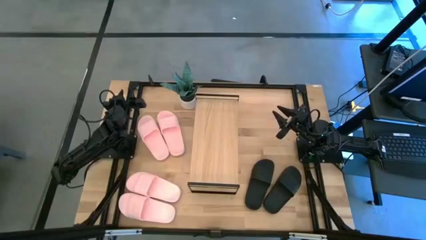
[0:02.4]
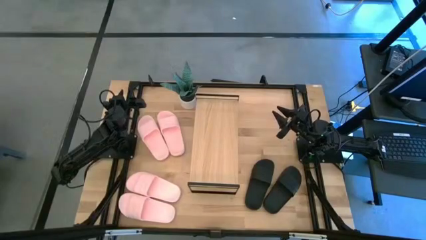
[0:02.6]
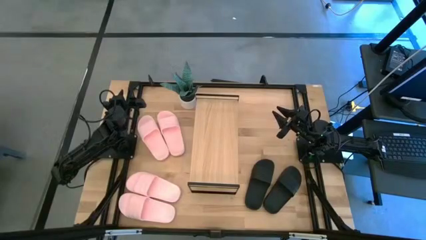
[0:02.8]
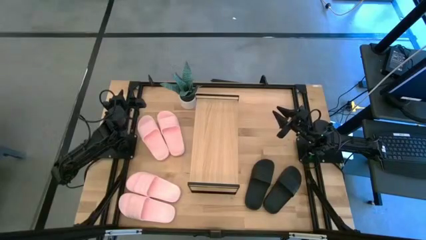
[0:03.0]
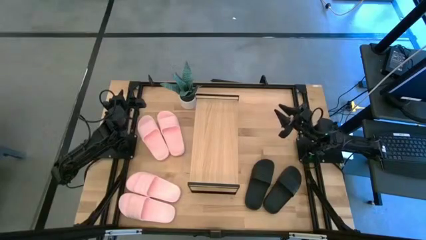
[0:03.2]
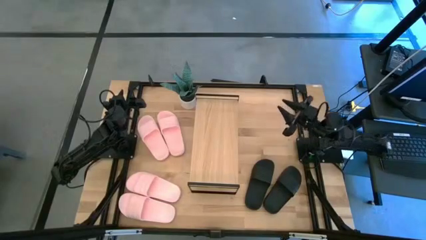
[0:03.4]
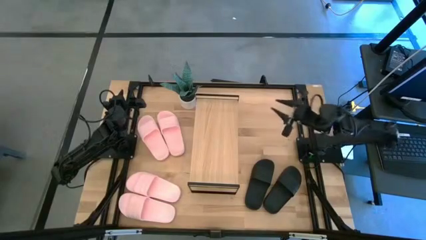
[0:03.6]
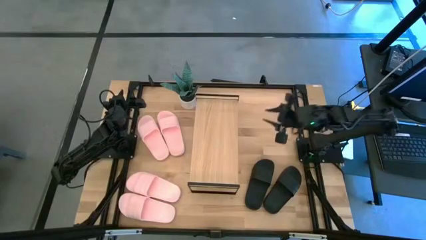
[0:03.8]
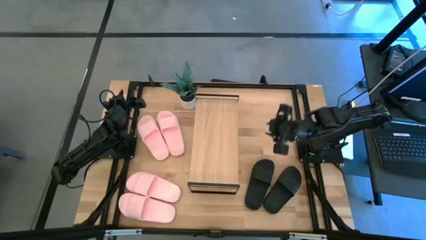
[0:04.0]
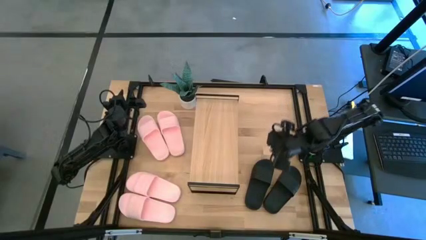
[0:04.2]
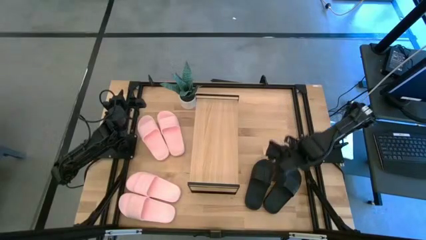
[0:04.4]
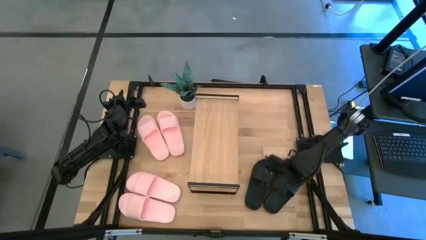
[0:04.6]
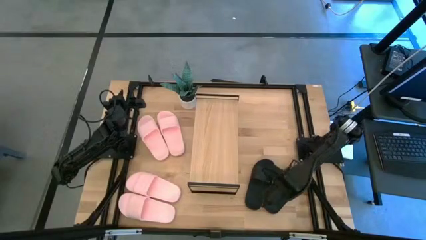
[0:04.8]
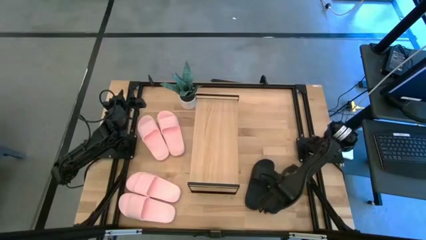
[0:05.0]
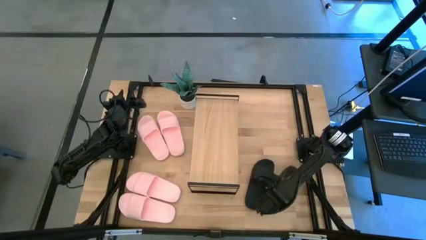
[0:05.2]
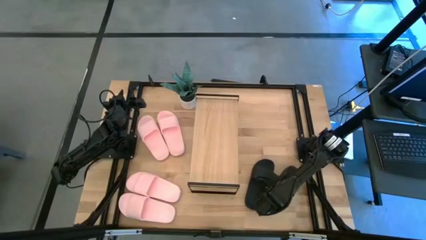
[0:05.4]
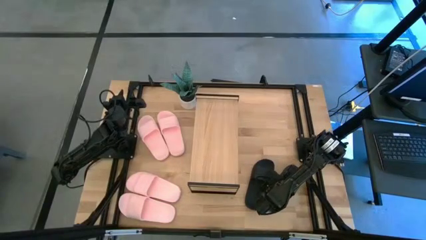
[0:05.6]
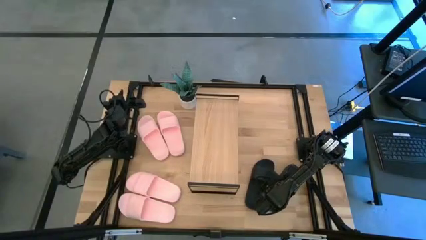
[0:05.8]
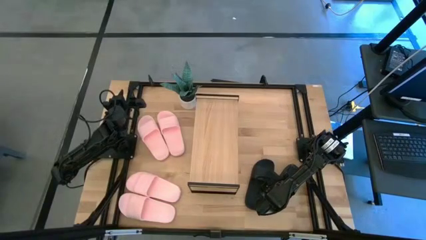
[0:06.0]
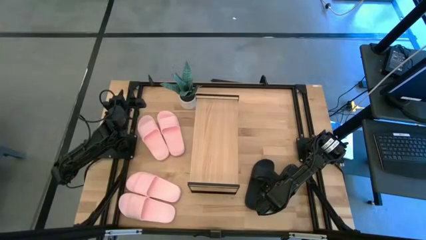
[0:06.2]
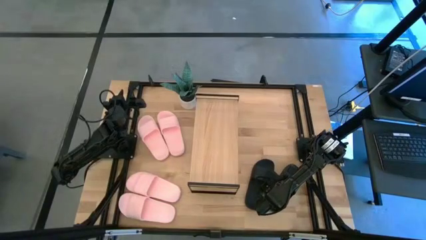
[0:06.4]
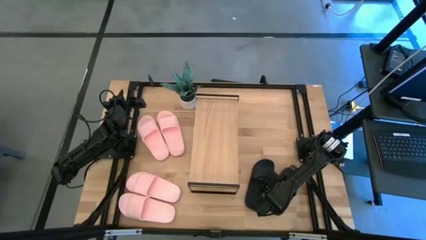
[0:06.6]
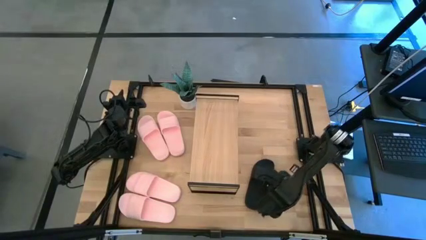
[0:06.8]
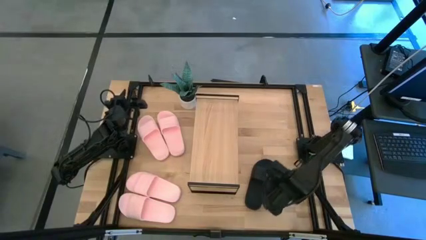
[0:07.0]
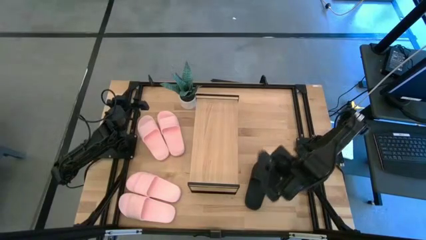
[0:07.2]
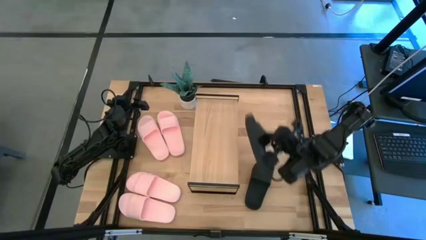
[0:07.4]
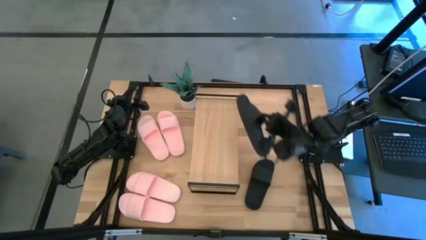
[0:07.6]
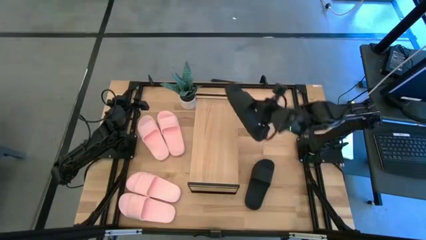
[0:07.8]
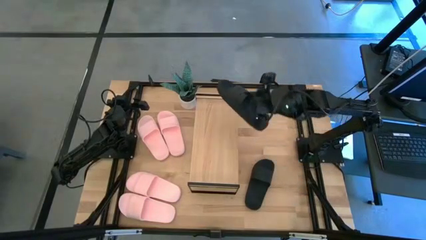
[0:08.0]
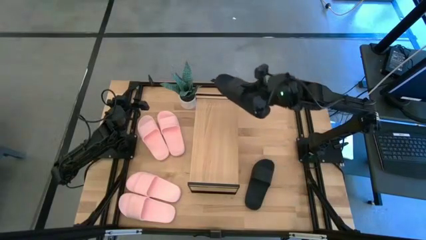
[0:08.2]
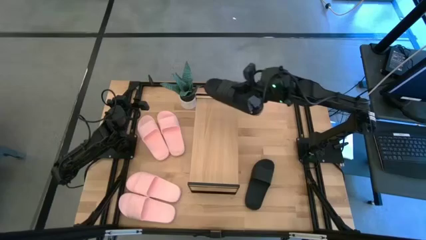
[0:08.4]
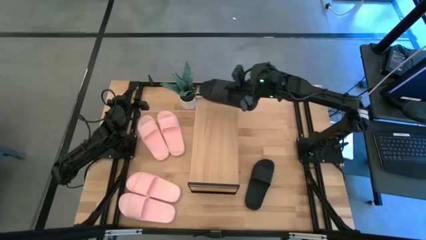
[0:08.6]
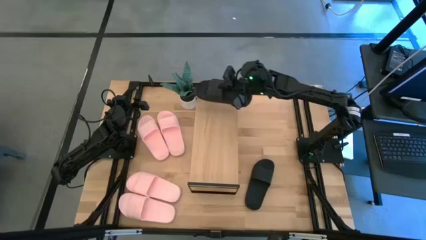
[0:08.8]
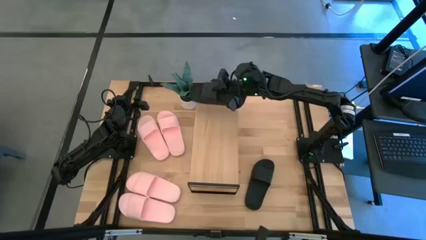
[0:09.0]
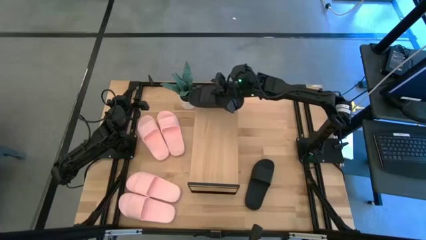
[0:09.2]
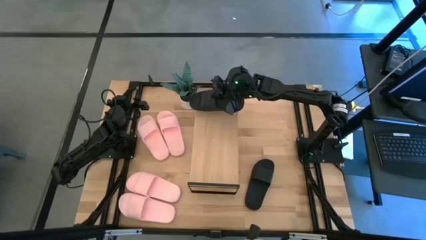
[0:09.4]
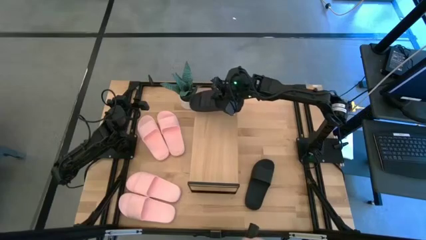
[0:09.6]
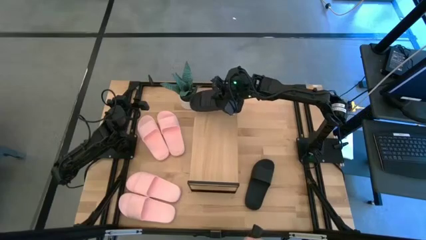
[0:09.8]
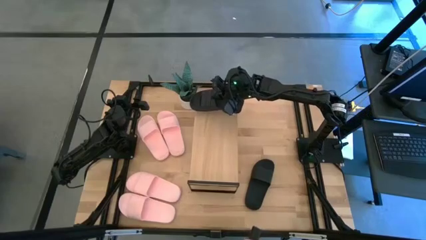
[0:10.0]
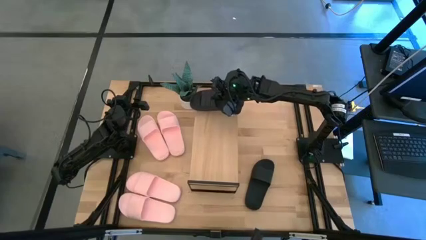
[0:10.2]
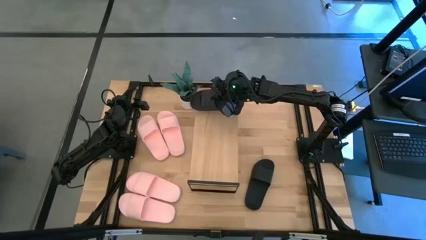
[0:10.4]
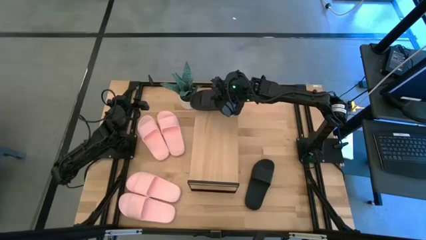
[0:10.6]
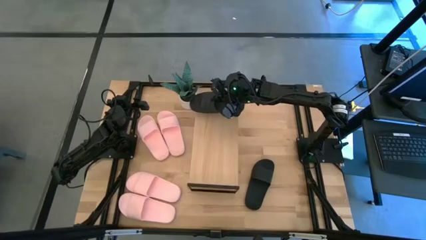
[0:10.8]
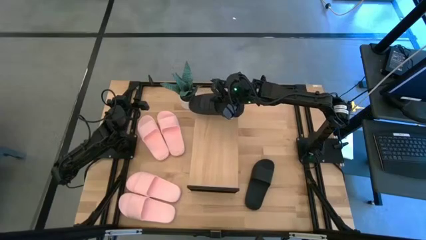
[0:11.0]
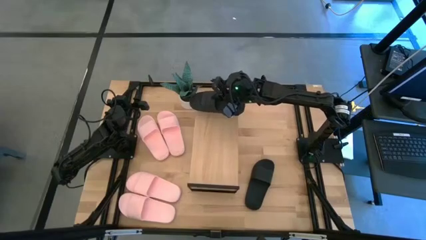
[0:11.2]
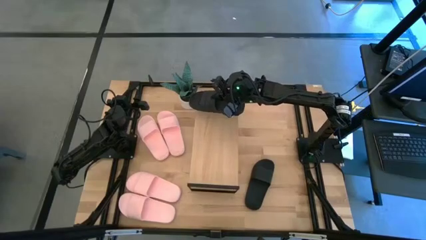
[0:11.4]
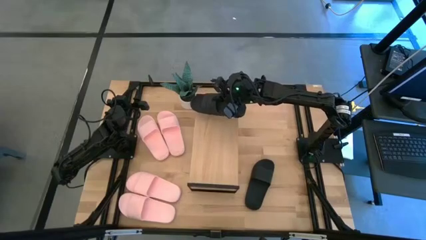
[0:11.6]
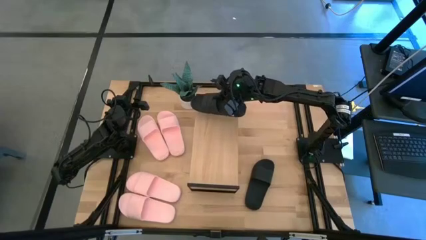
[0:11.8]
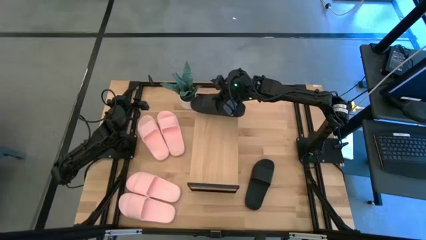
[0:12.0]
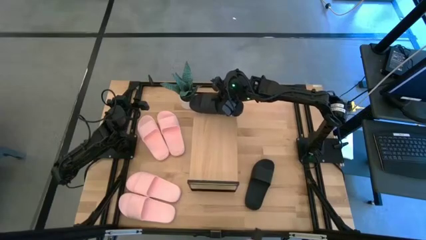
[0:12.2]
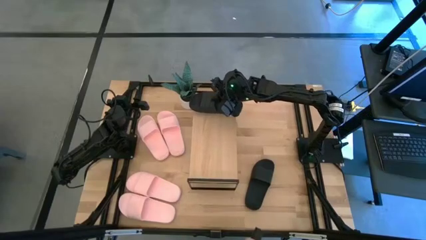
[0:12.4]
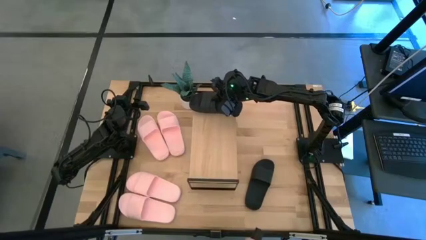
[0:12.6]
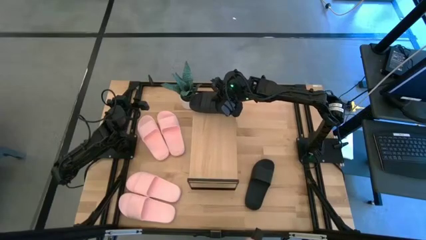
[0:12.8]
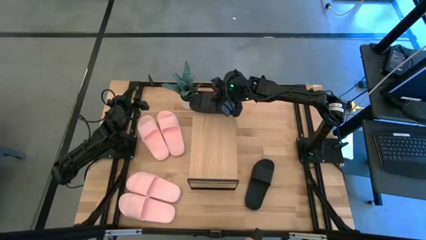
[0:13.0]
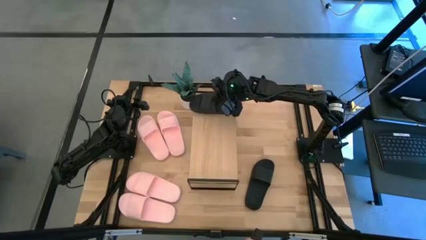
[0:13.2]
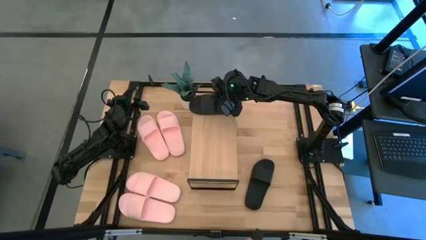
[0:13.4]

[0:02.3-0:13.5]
Task: Pick and place slides into the shelf
Put the black slide on the shelf

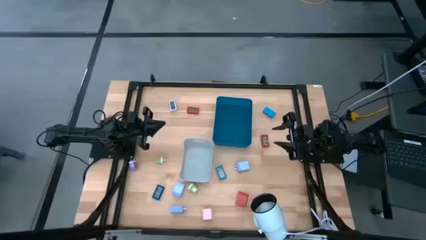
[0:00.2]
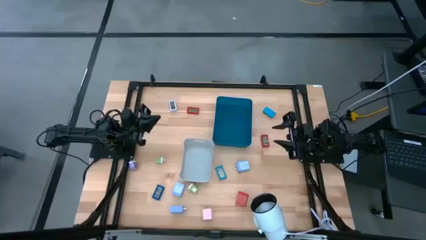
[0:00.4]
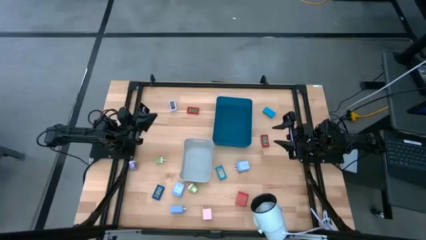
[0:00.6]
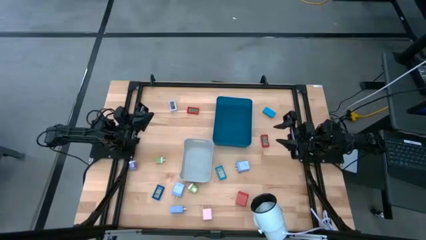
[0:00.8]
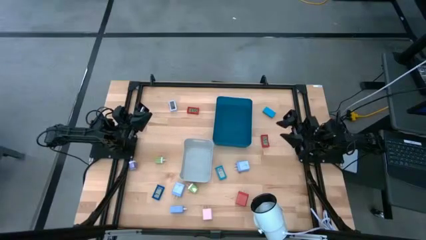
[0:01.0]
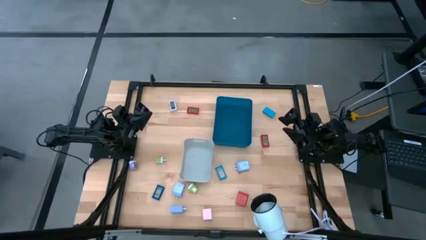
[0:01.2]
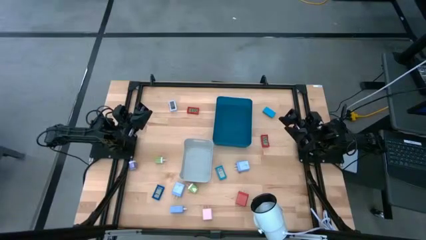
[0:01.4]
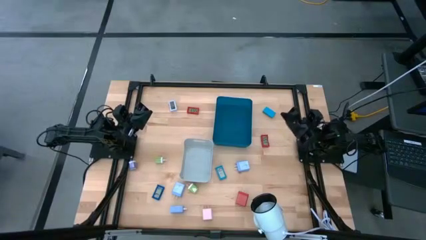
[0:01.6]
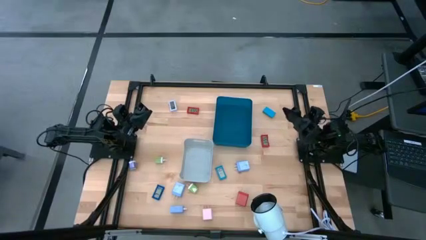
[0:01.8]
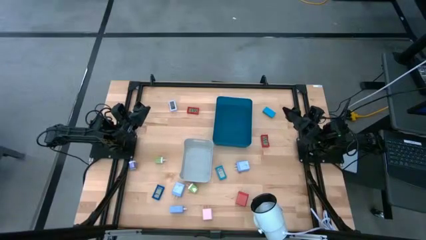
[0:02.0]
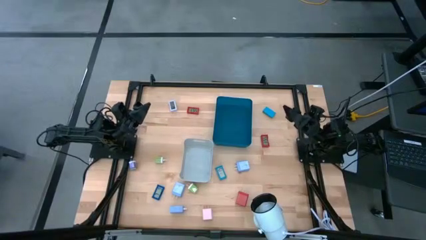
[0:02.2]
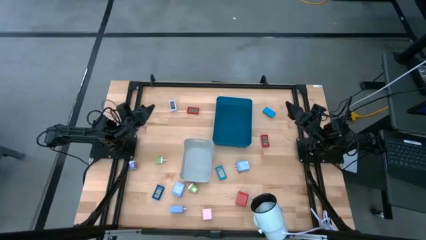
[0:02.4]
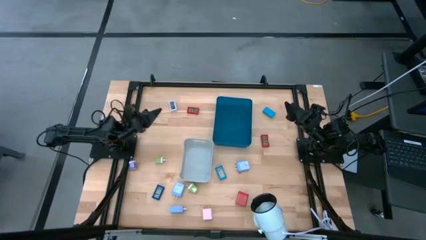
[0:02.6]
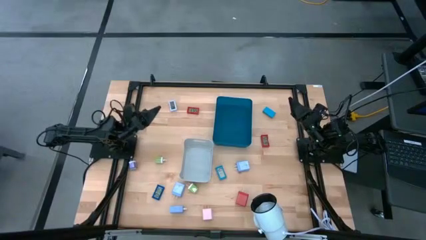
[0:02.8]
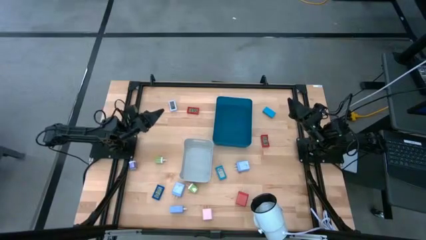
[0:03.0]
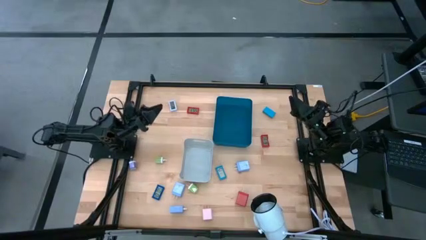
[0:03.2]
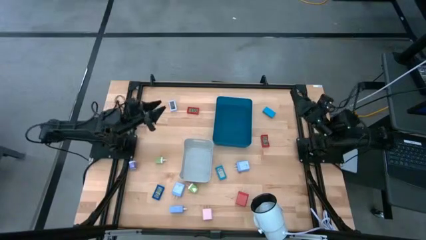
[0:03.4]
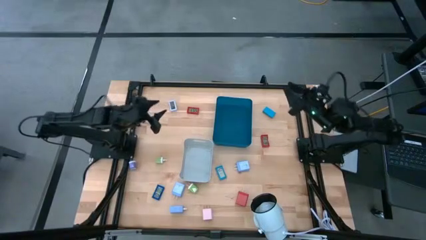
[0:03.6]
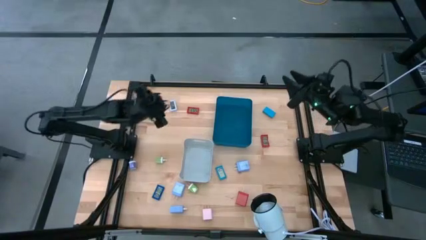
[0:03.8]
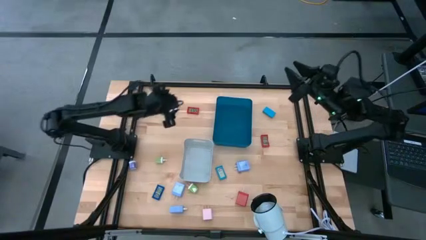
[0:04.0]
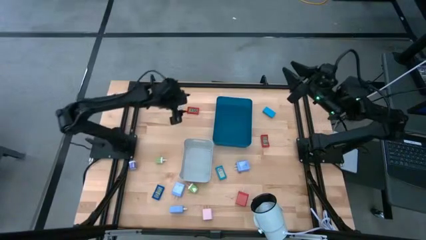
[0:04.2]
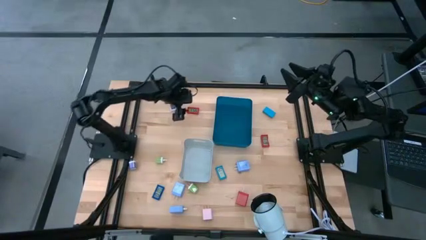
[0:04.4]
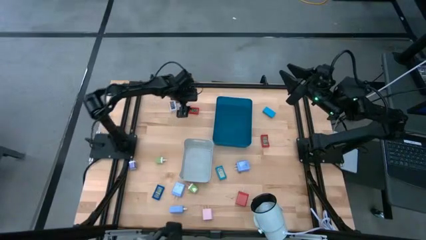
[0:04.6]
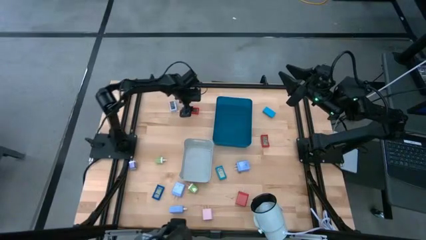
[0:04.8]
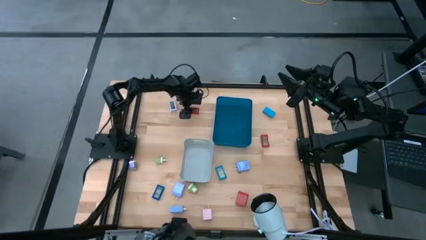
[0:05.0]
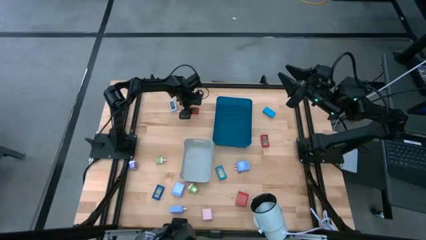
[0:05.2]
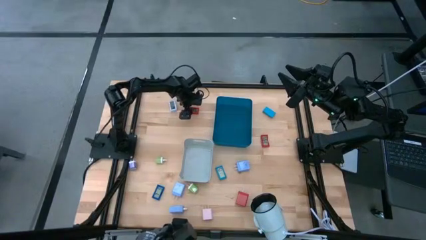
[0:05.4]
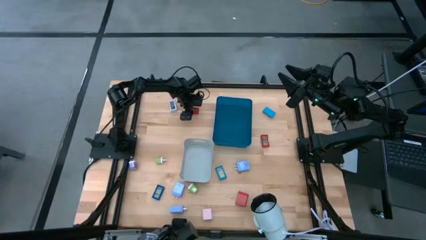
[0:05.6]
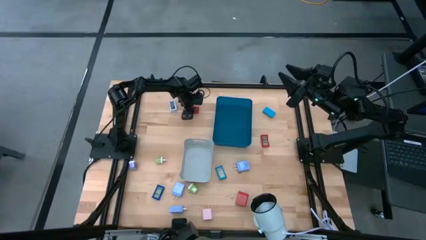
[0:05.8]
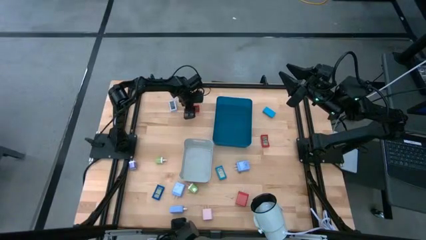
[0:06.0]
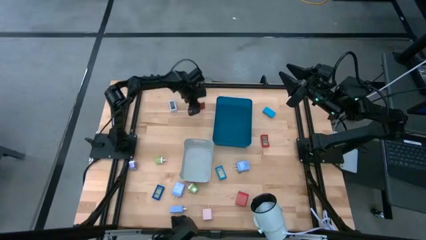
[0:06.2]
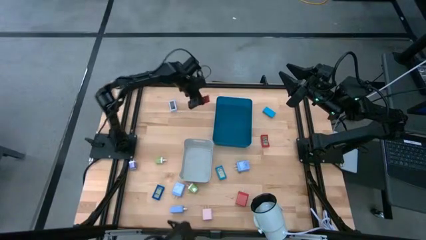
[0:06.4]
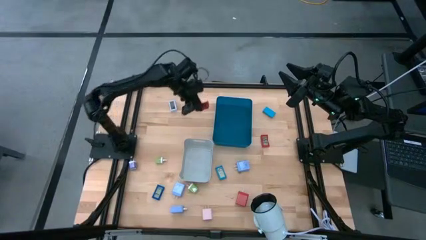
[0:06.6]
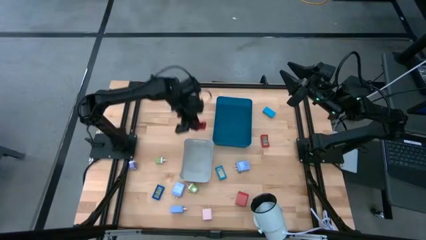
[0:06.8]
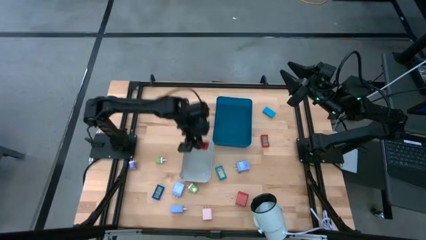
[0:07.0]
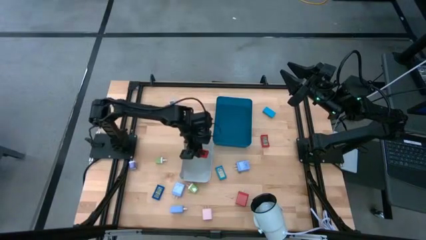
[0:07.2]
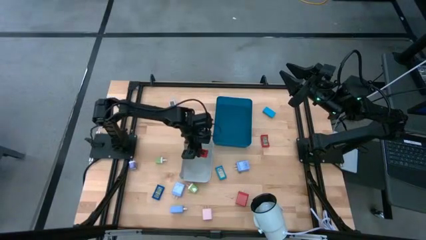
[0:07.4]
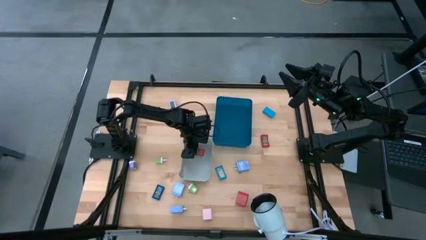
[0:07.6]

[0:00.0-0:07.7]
Task: Pick & Place Office items
Put the left red timer into the gray bin
